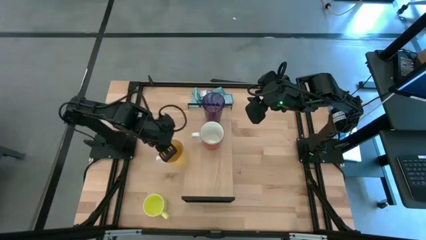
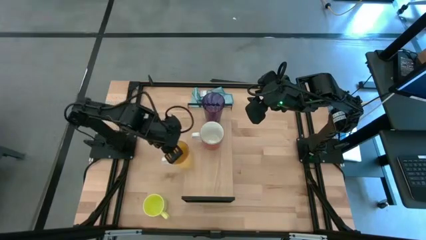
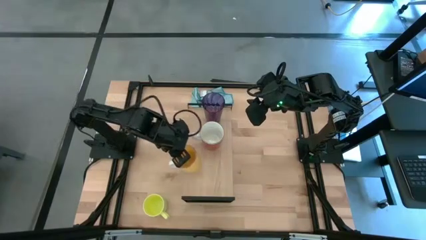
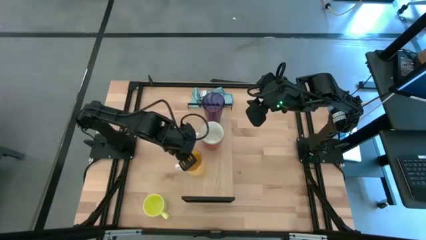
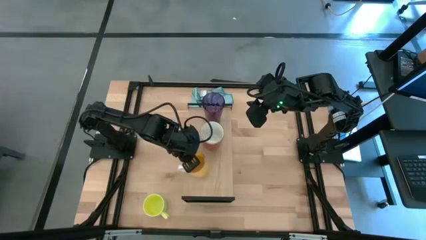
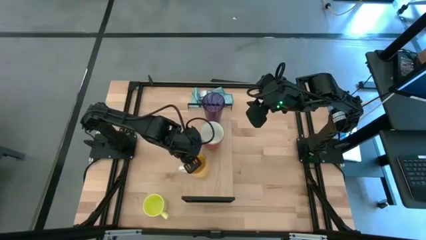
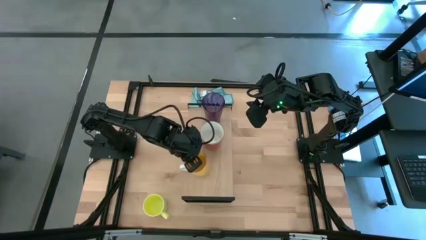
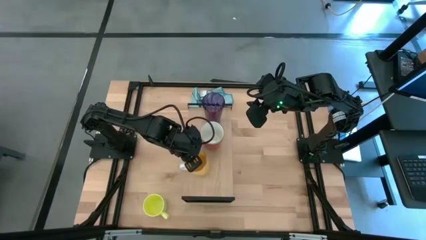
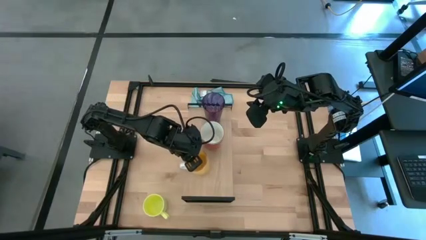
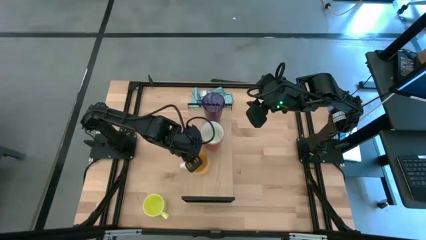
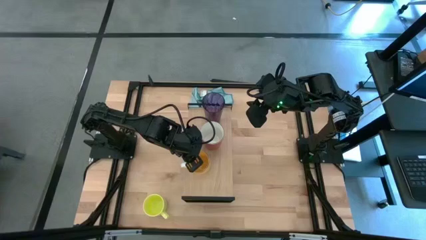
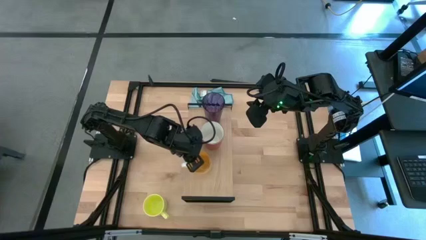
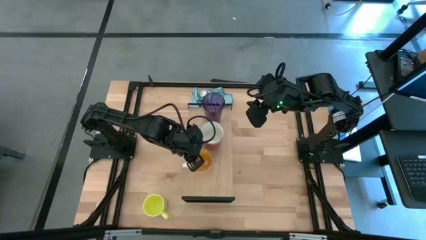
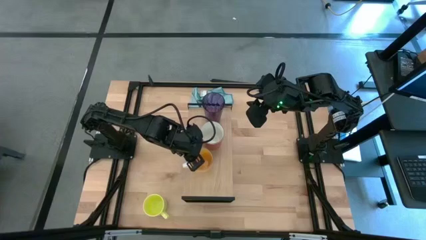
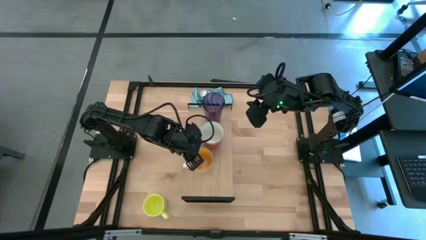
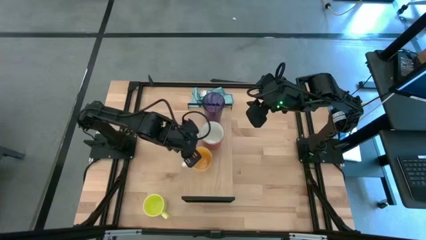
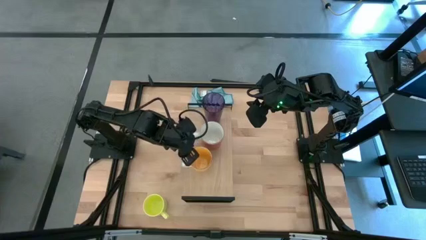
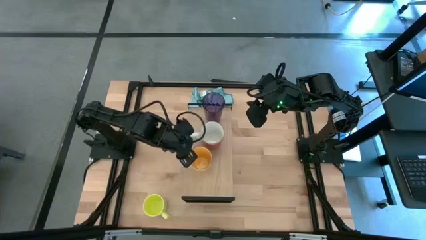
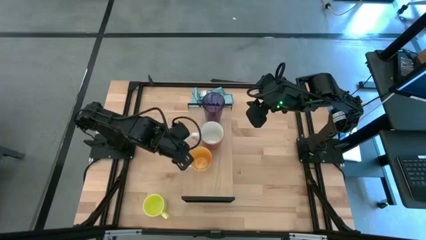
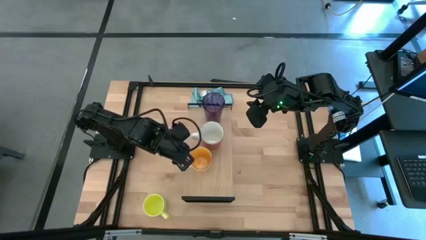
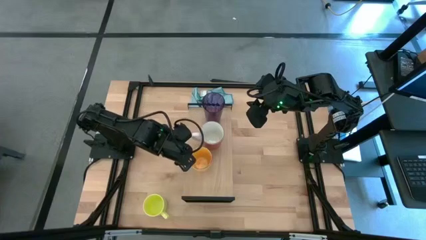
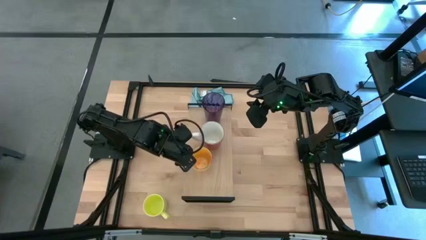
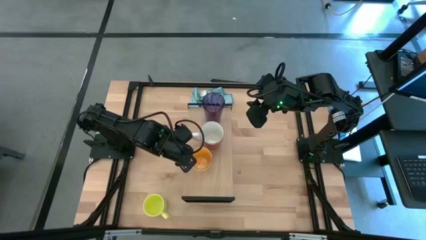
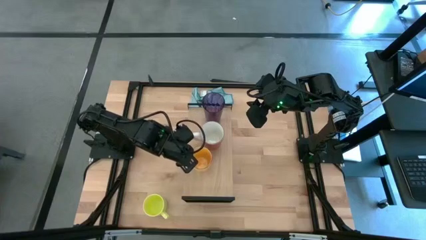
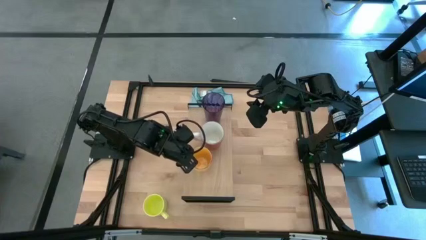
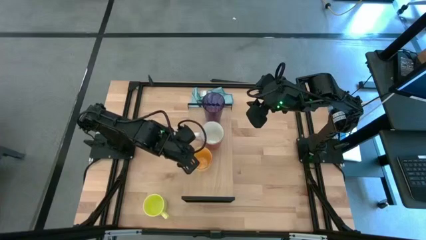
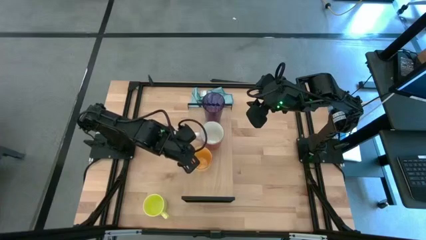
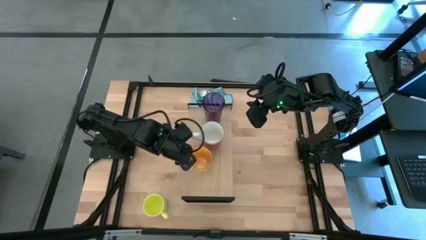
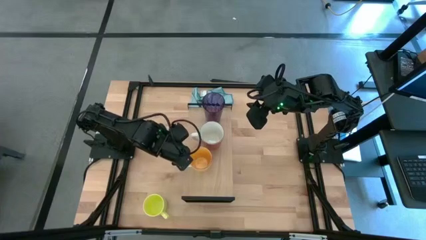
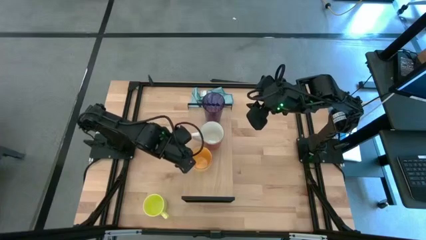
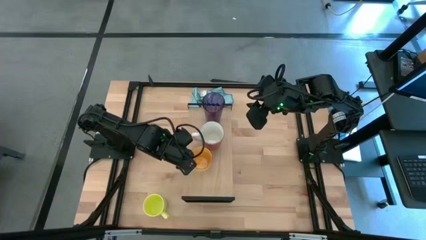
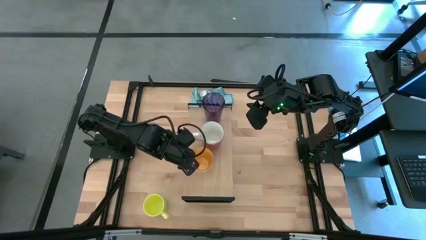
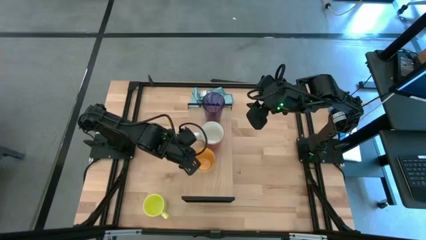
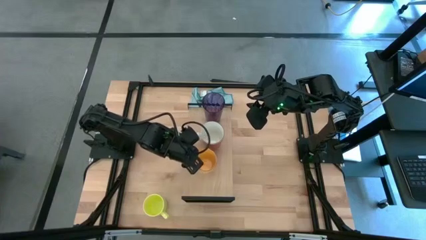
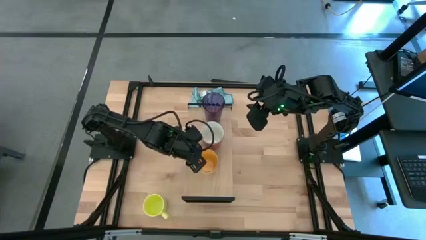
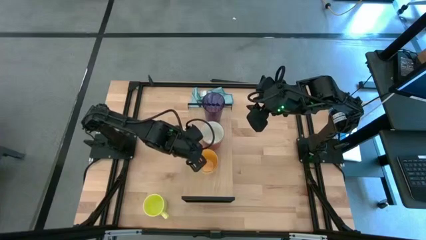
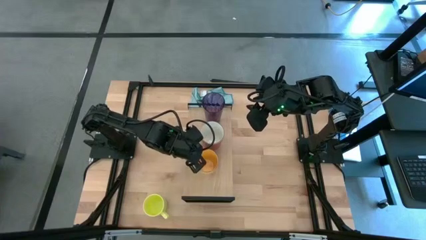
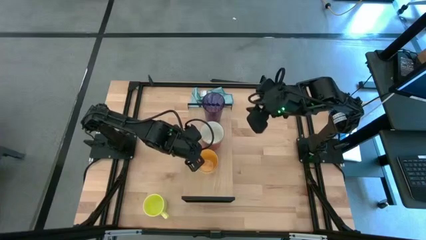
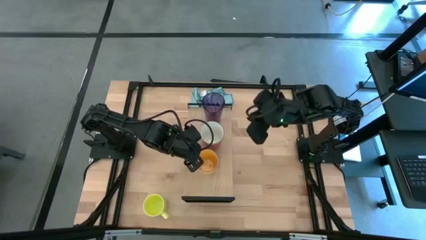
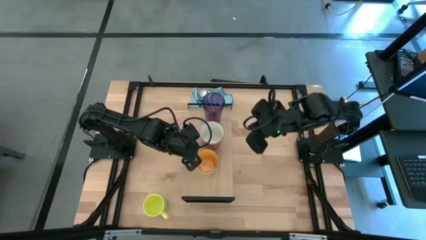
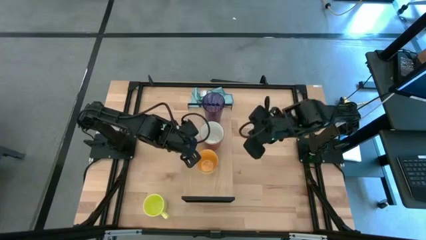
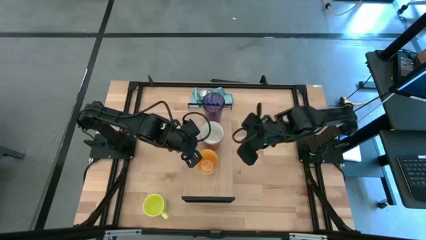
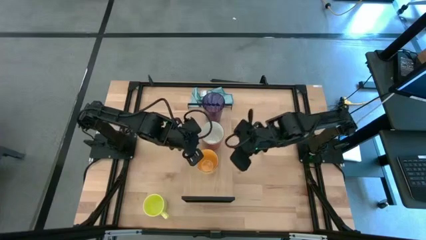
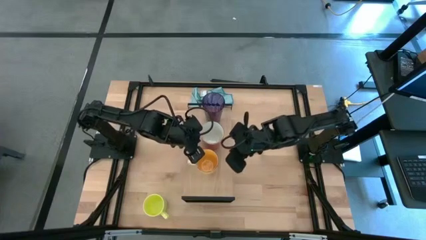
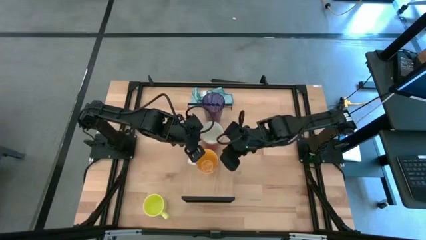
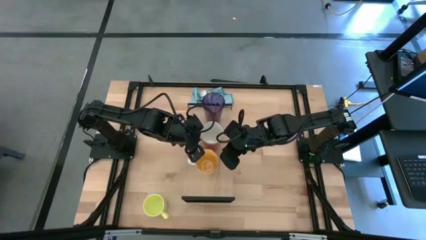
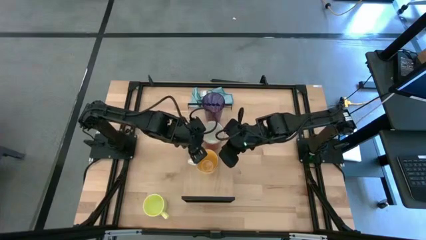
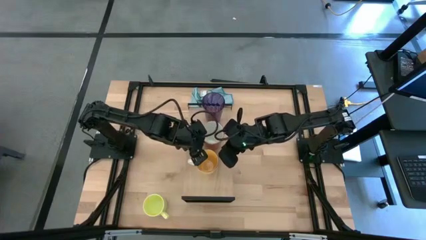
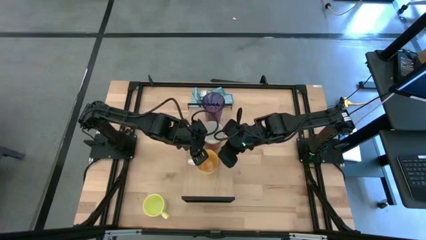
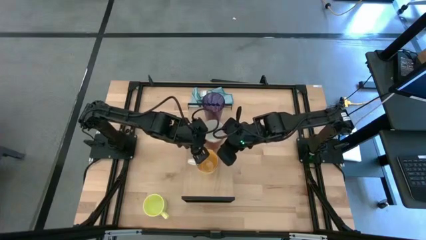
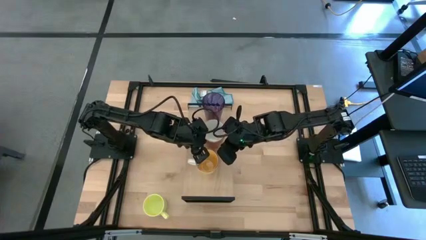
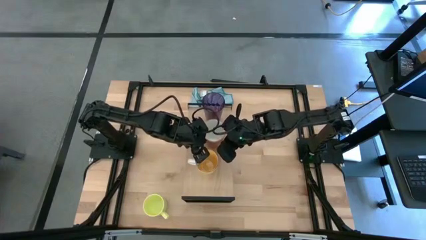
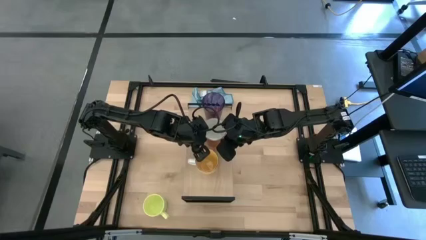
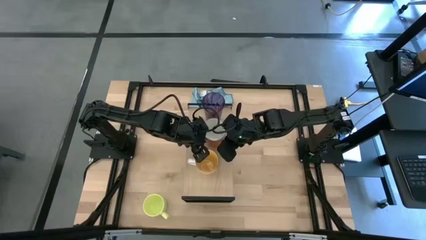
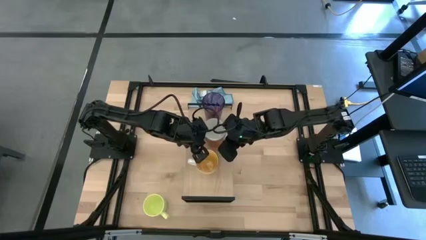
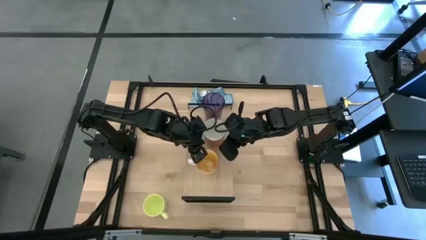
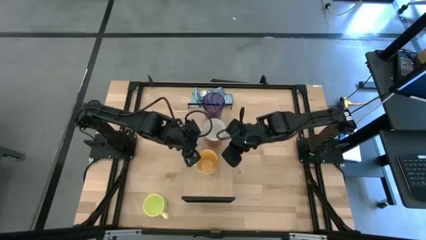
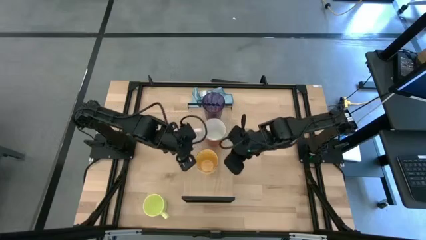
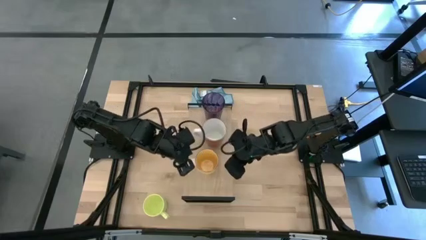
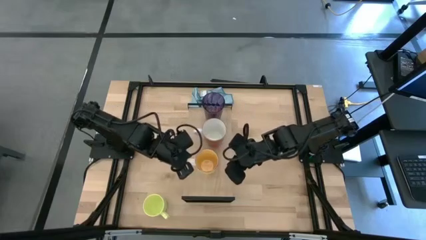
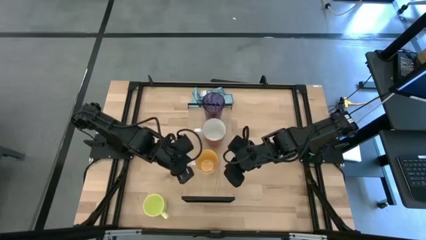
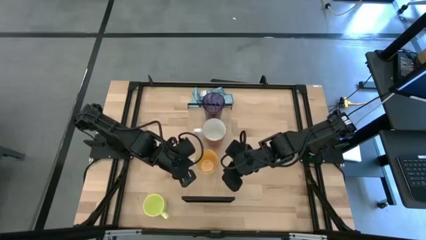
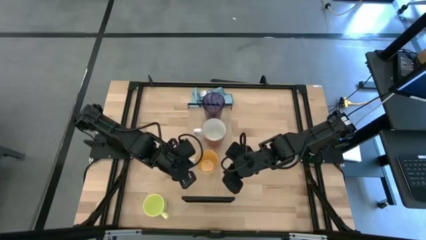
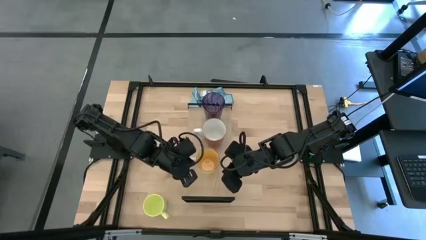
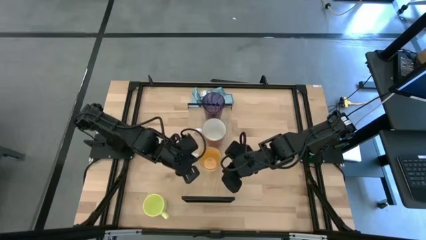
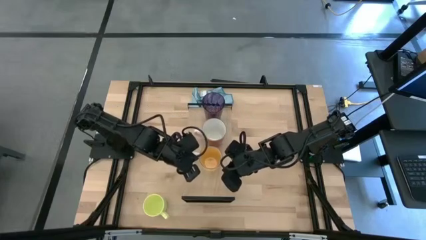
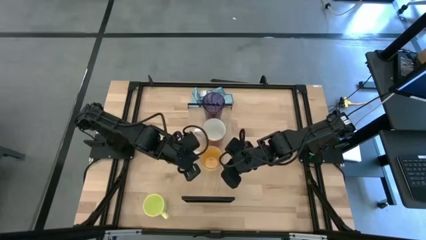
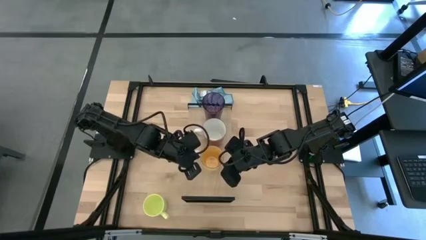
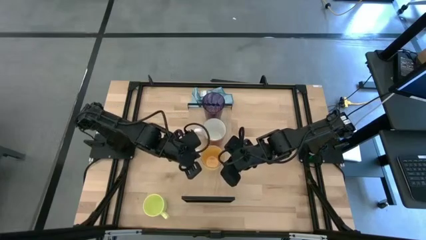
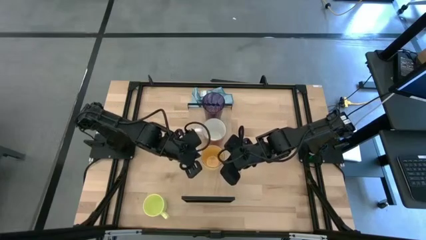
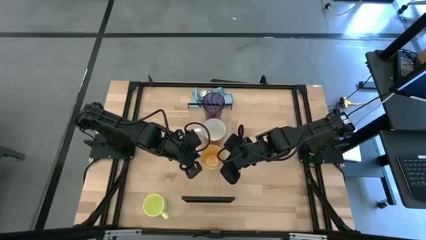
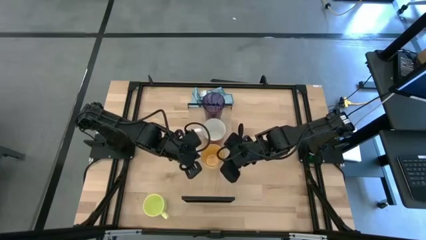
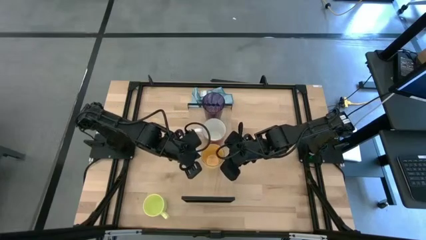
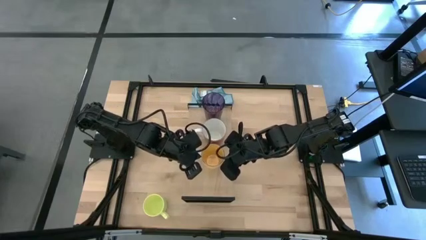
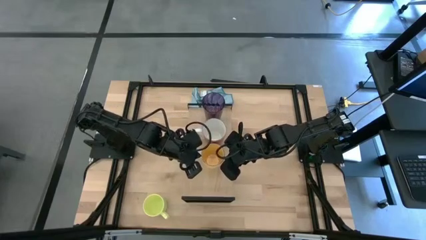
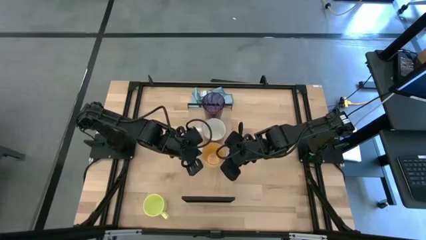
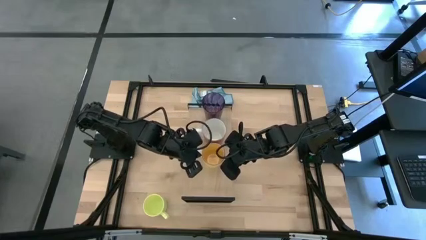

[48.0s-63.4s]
Task: Stack small to large cups/mugs on shelf
Put the yellow cup on the shelf
